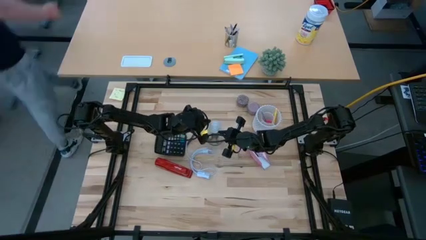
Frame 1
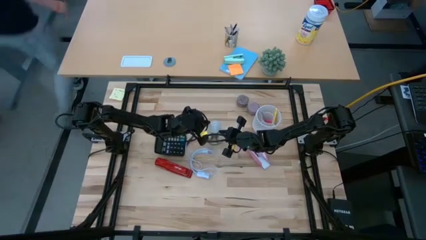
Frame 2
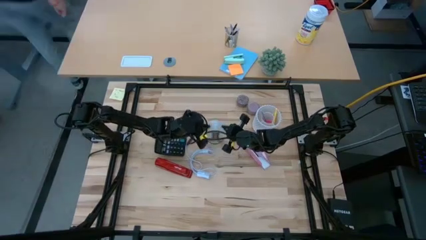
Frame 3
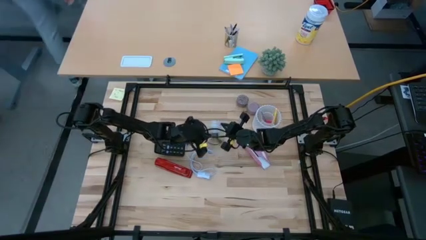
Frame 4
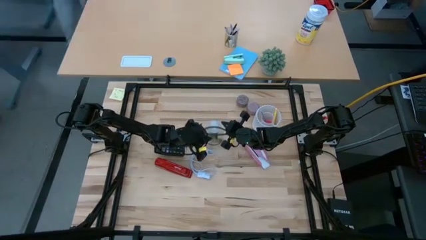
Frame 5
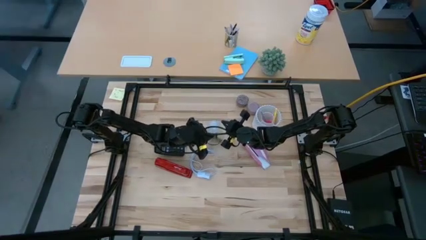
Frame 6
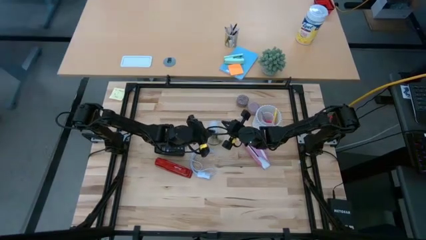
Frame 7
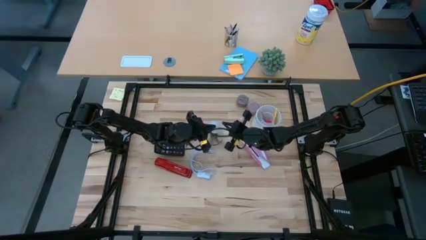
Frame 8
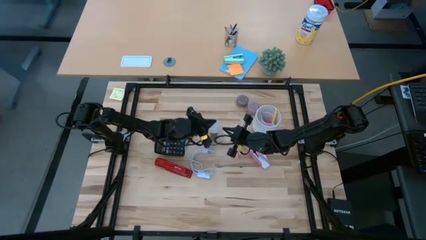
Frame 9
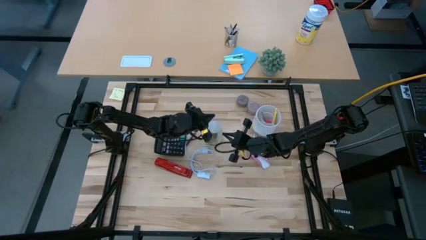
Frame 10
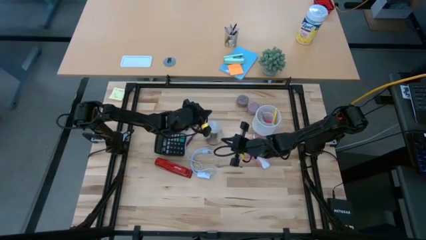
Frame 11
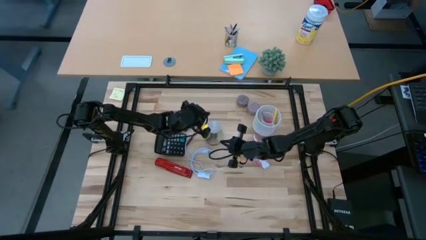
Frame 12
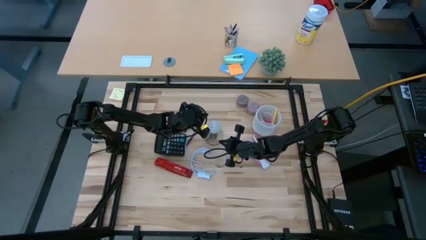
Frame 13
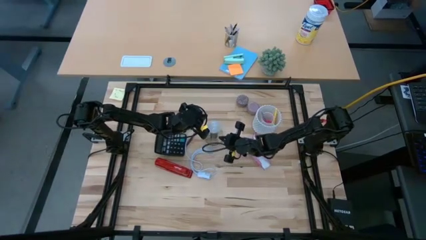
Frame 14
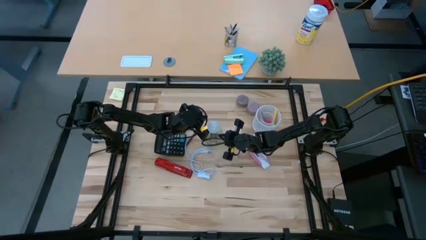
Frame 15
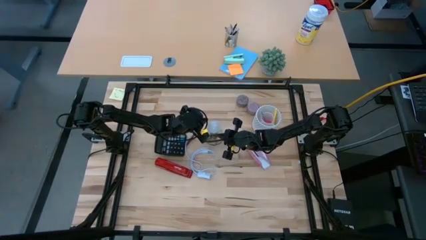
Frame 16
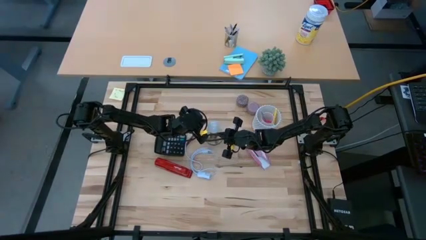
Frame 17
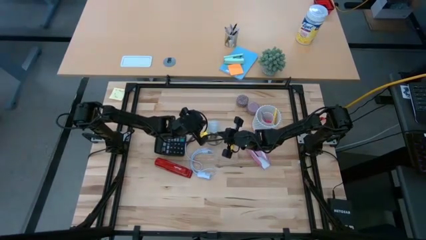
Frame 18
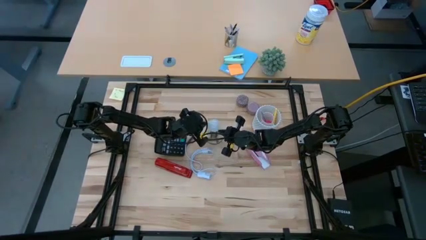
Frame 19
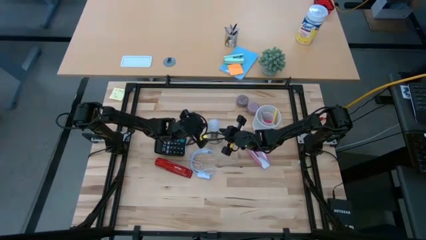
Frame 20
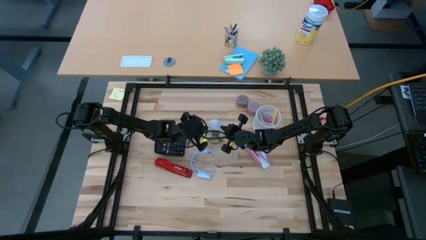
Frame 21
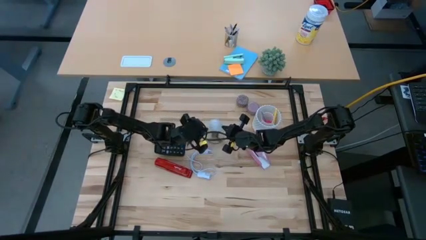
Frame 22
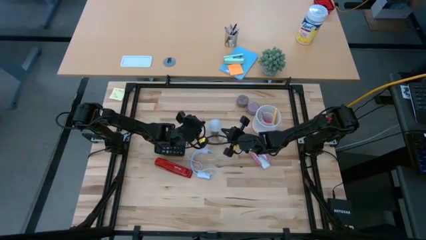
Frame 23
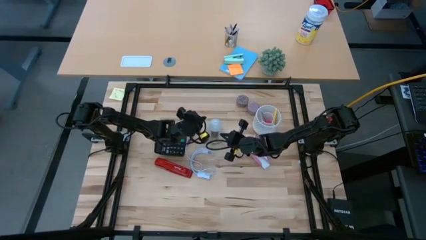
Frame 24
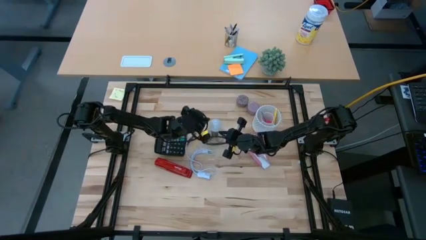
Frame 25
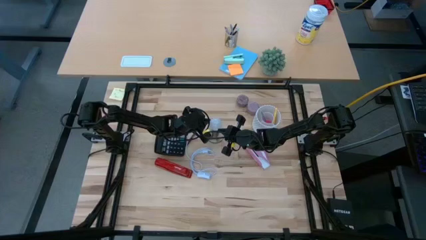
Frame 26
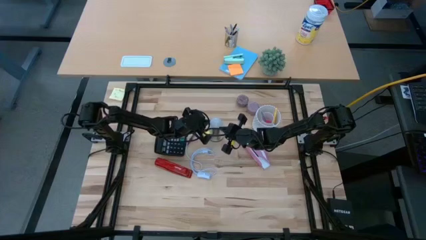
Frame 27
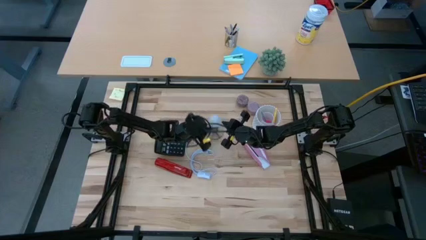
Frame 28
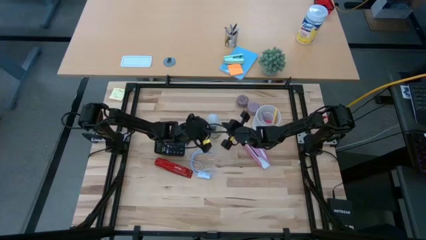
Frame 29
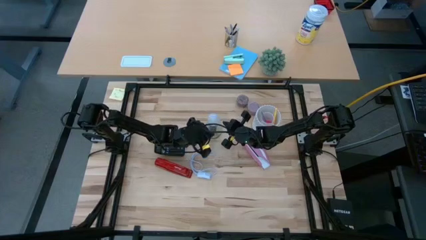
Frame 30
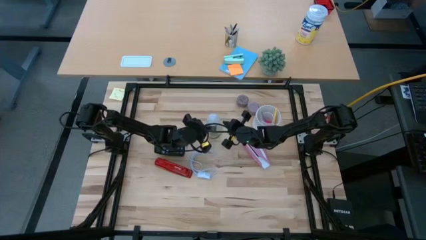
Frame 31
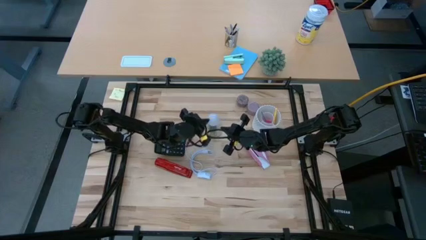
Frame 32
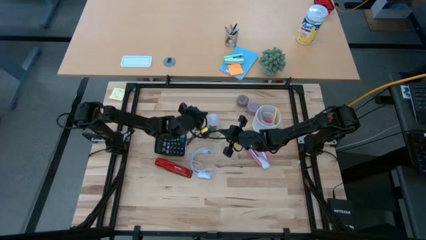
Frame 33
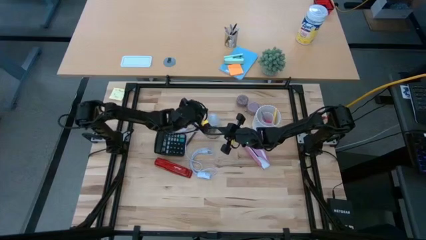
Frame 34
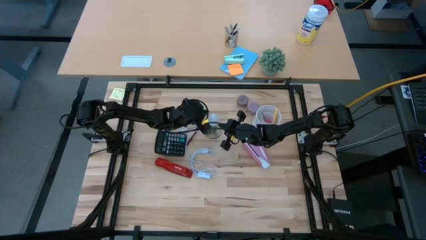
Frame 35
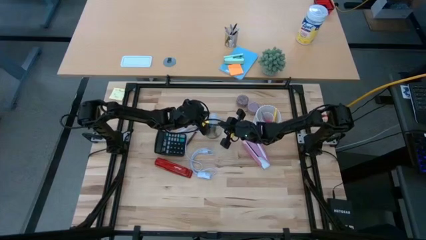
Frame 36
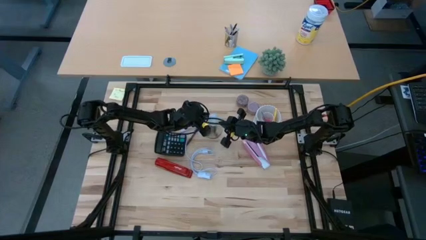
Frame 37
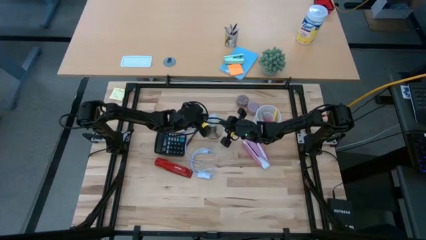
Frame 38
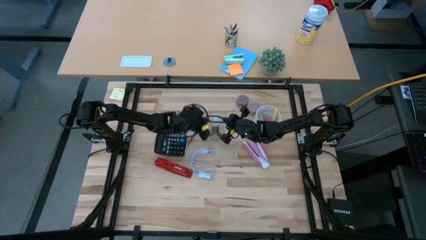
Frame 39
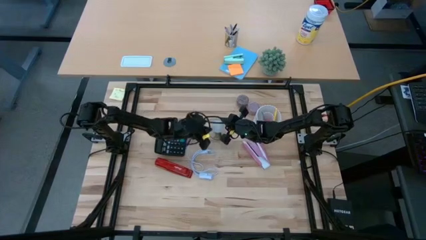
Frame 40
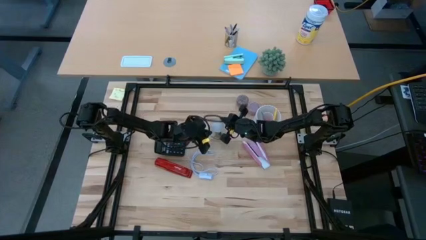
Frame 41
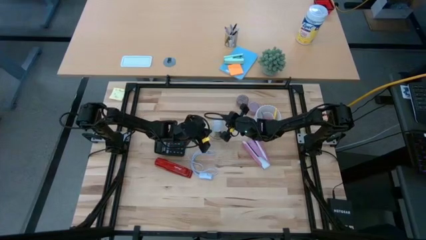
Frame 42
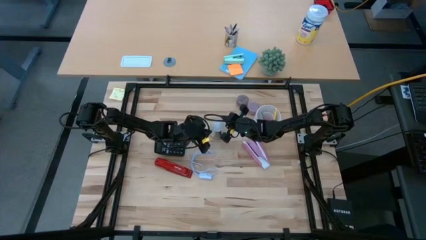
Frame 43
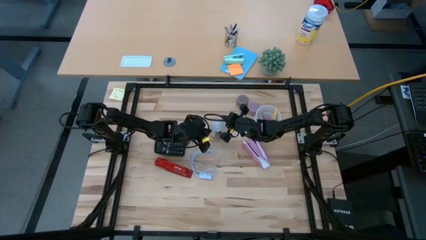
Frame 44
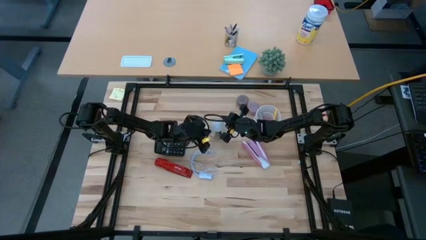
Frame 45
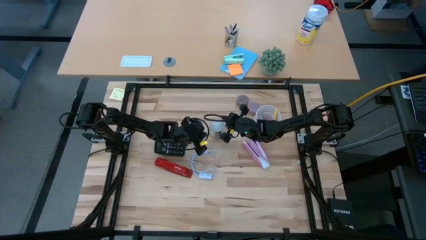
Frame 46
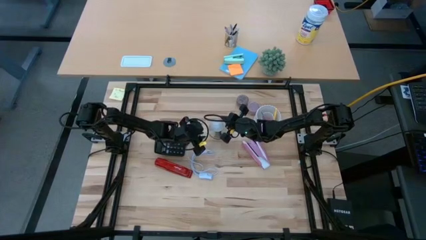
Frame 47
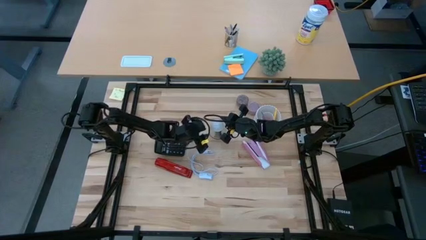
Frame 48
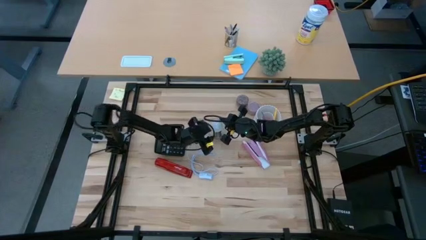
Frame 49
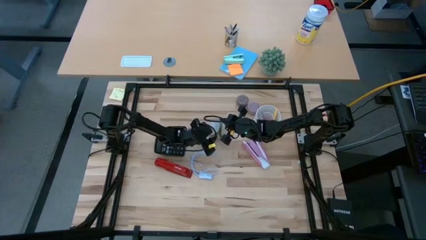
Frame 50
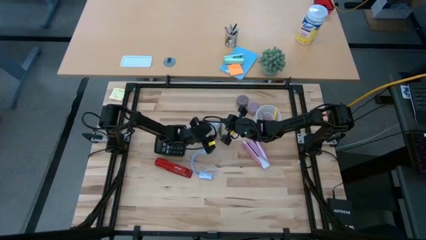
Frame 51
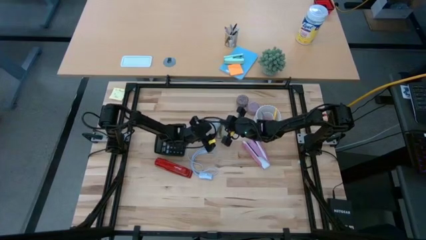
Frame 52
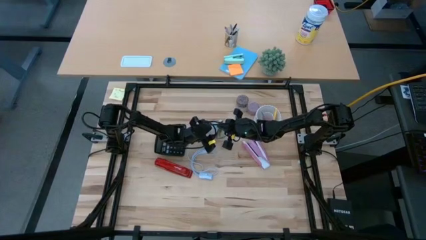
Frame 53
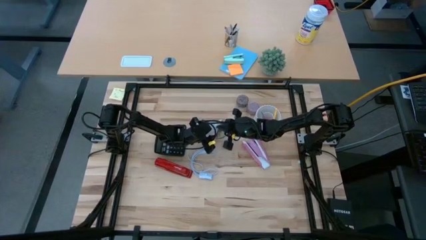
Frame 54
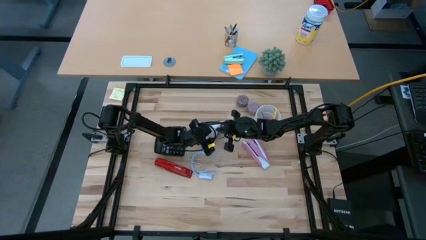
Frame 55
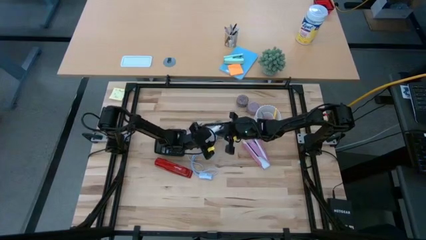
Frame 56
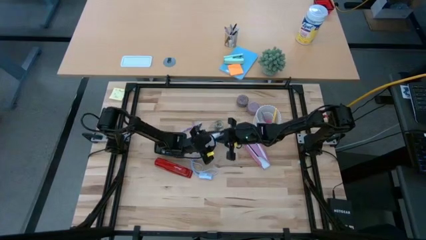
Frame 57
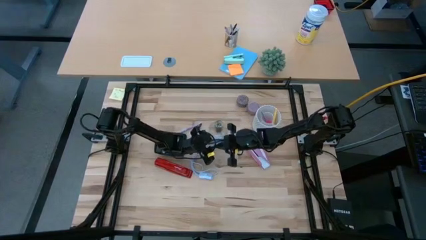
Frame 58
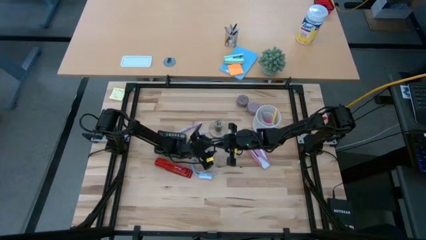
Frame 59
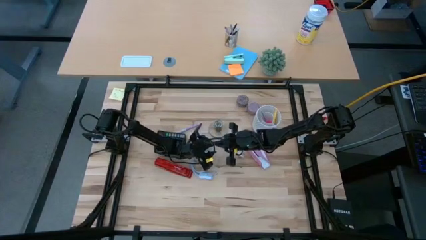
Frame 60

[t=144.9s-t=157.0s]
Task: Screw lightbulb
Remove the white lightbulb from the golden lamp

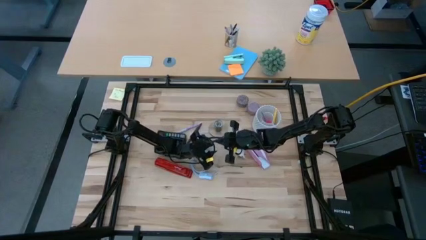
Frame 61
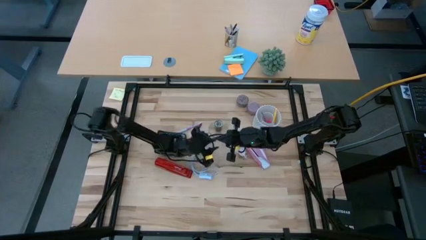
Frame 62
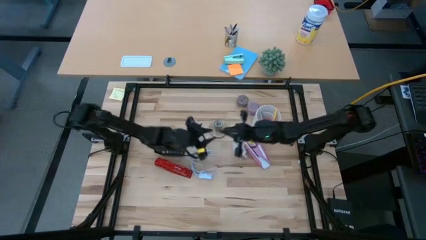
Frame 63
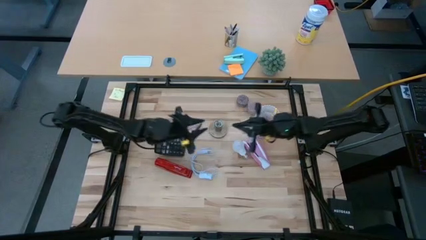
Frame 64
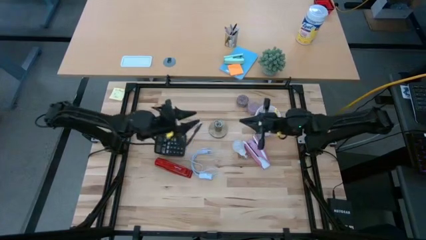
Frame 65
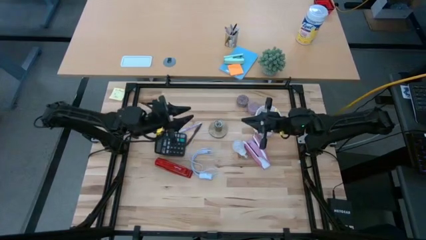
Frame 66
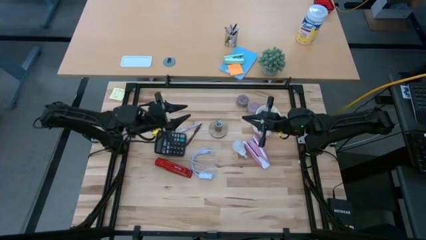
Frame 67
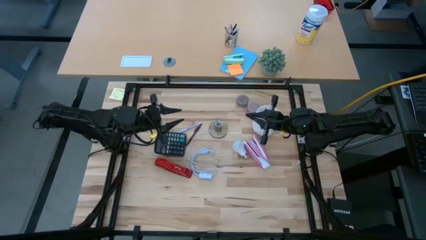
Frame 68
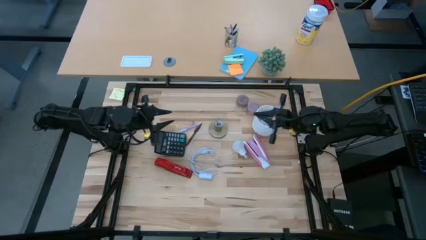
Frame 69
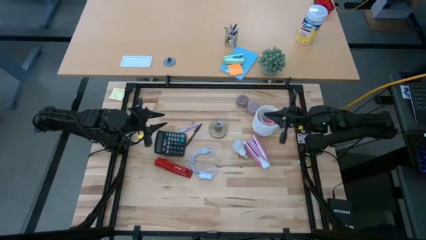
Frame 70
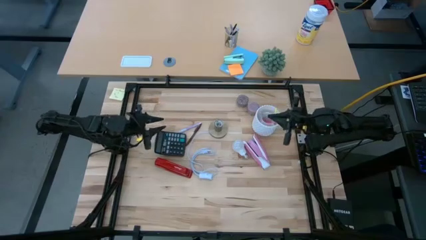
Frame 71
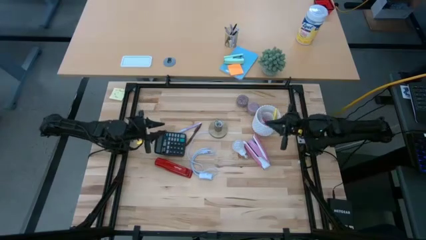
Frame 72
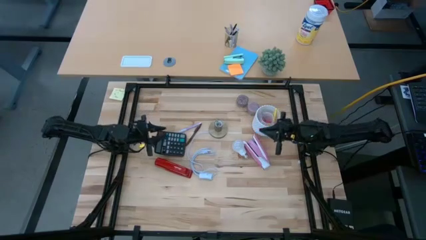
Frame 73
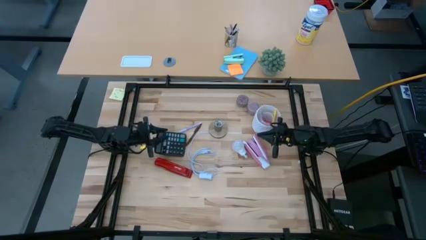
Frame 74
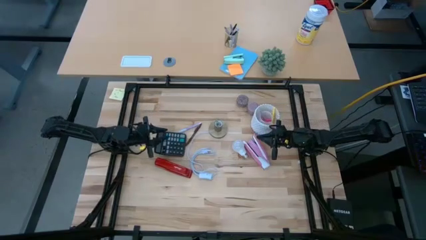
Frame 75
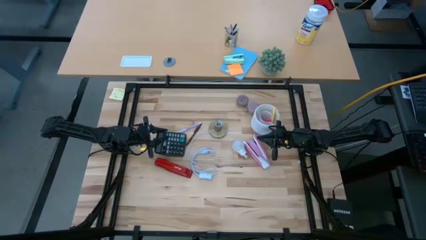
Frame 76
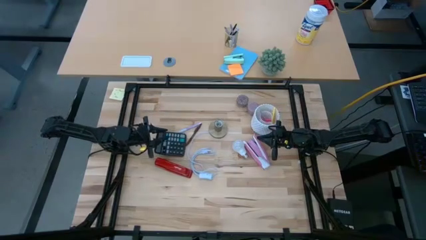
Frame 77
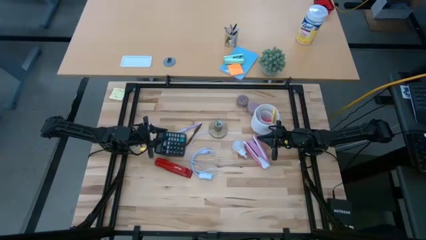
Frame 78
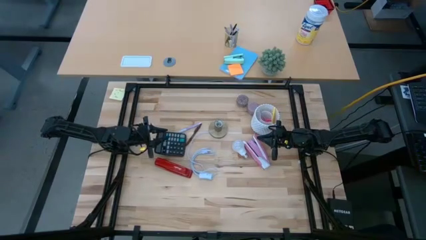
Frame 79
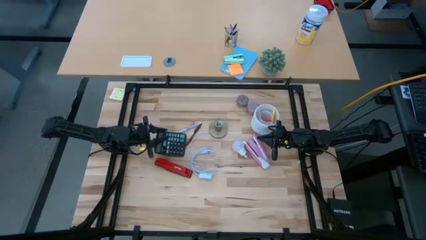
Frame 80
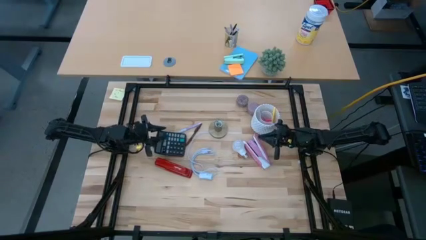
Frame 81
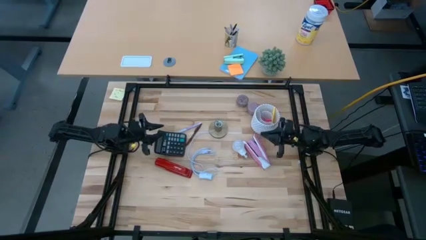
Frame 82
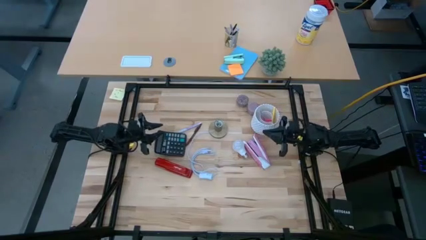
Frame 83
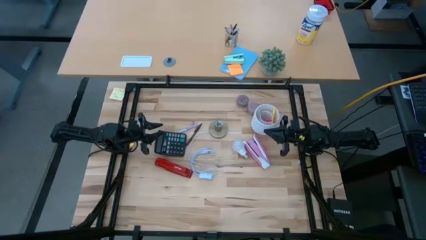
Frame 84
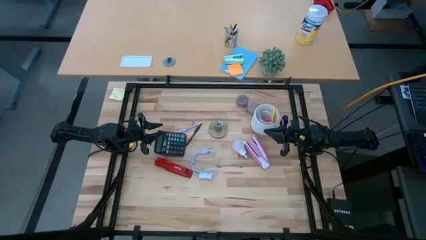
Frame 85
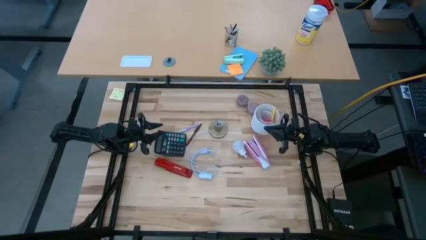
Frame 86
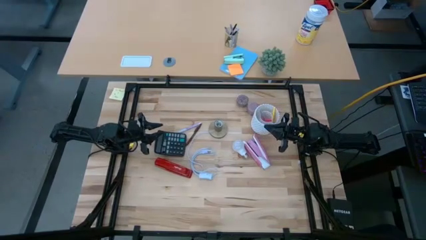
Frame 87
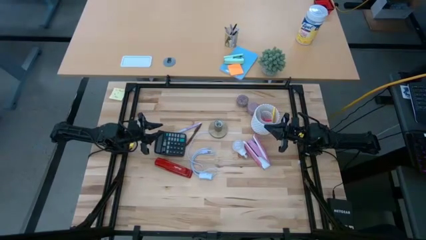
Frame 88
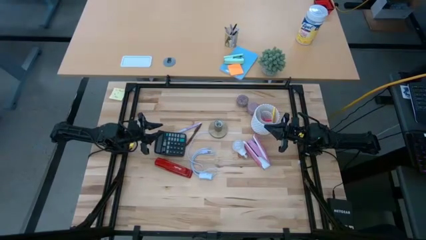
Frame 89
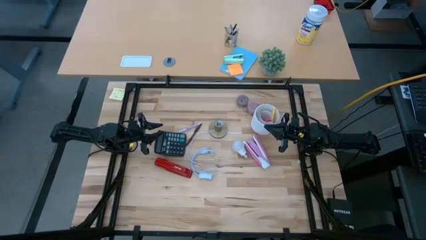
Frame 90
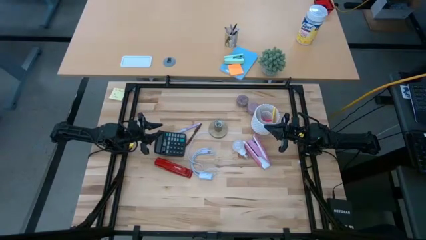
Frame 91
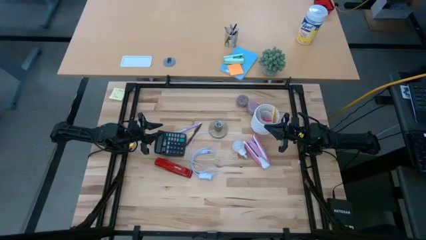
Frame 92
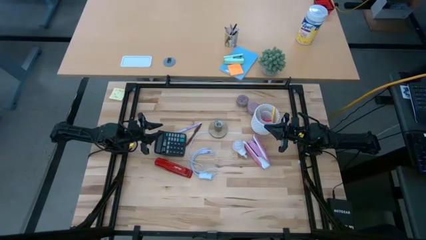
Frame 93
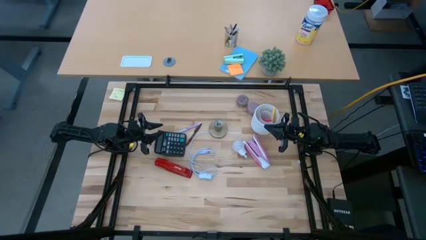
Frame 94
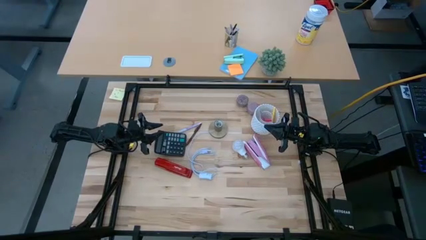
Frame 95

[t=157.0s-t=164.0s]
Return to Home Position
